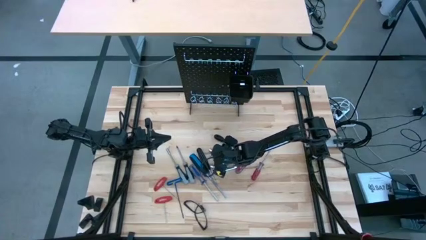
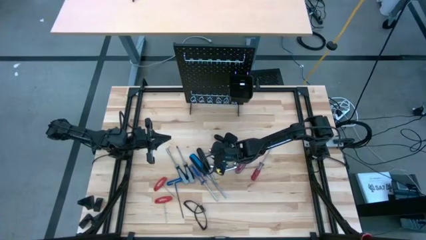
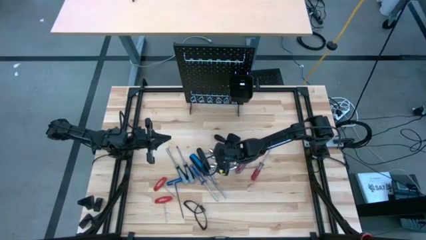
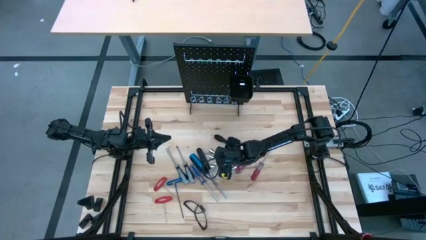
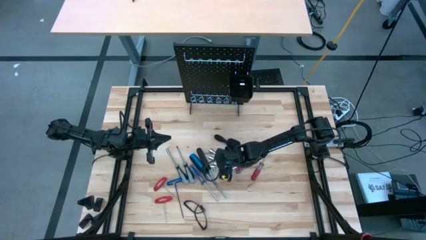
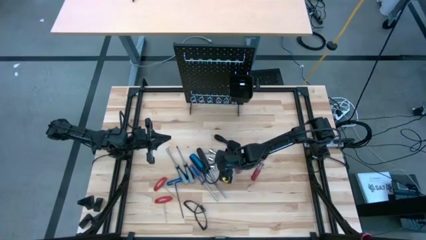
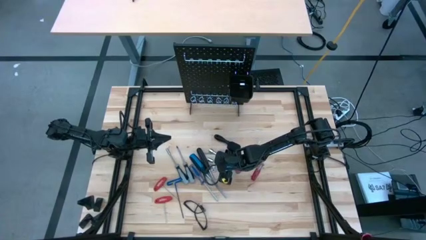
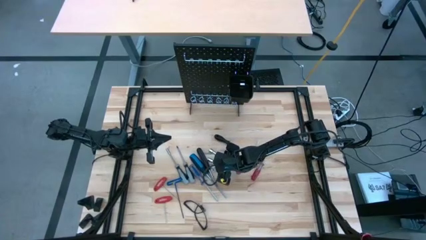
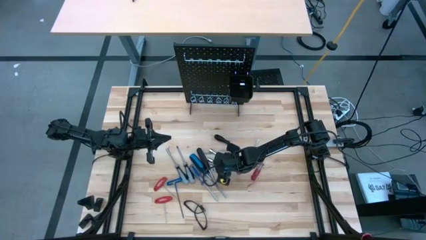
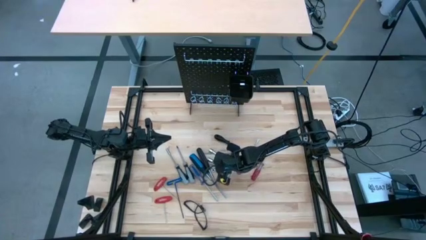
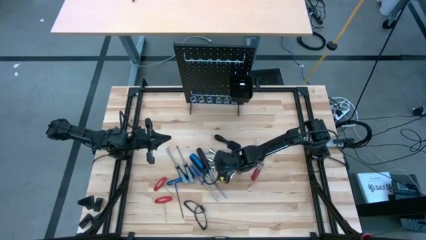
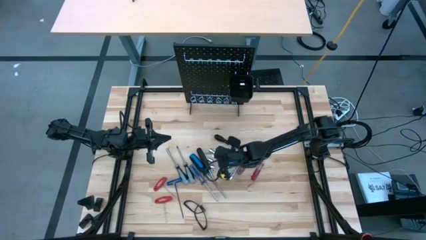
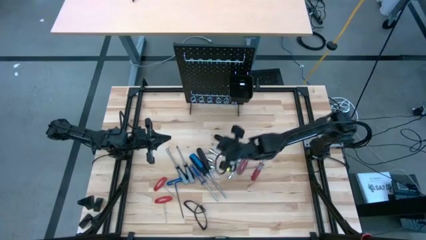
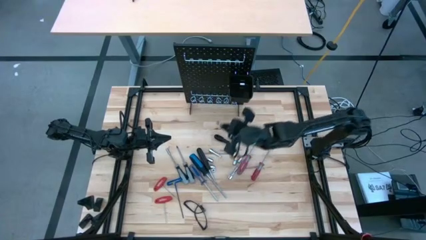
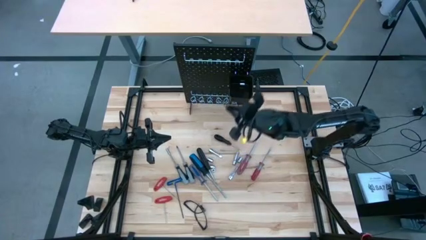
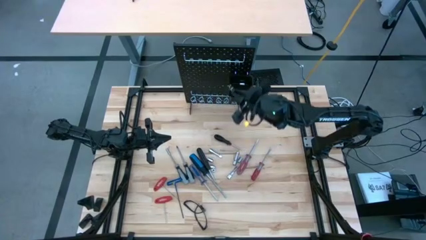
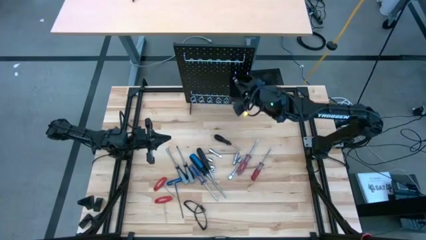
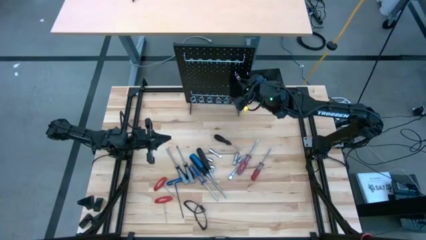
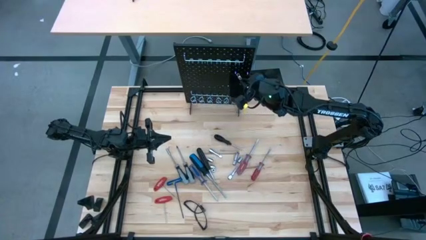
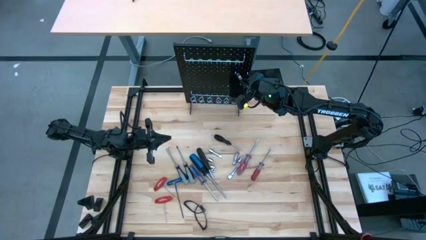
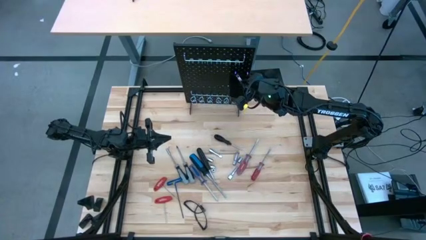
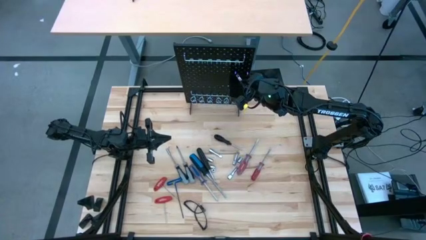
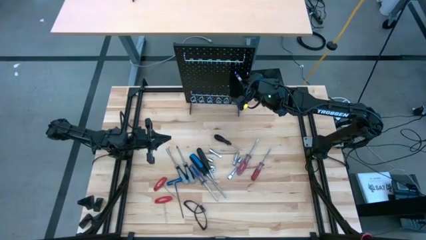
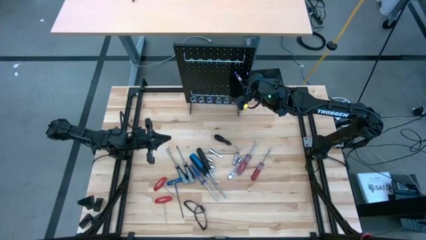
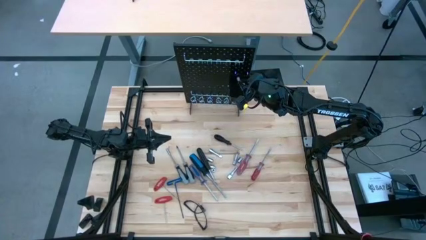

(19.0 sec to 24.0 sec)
Task: Hang tools onto peg board
Put the extension bar into the black bin on the pegboard

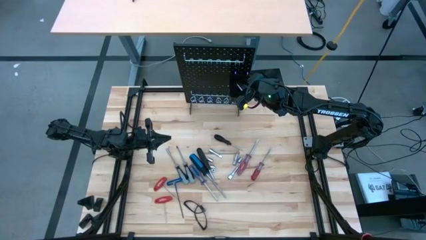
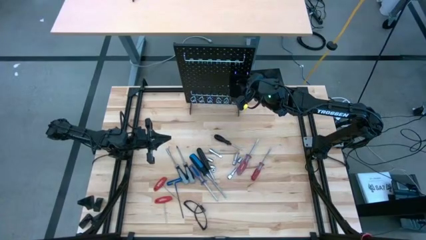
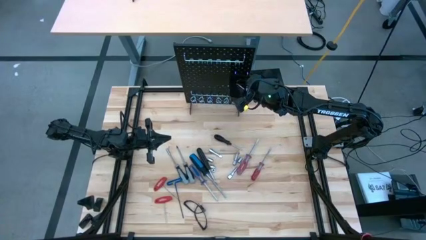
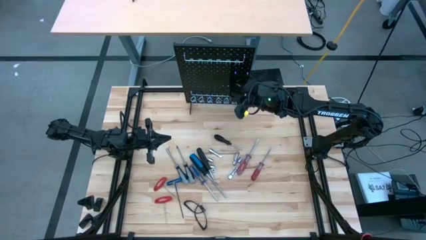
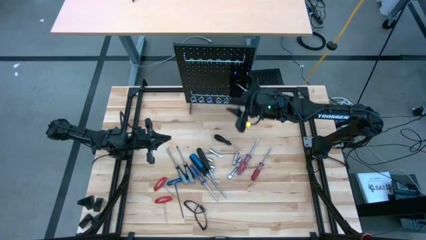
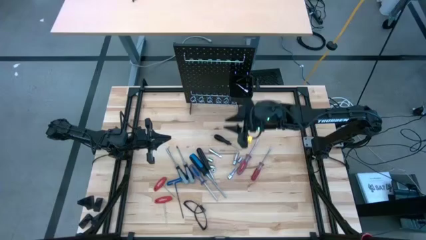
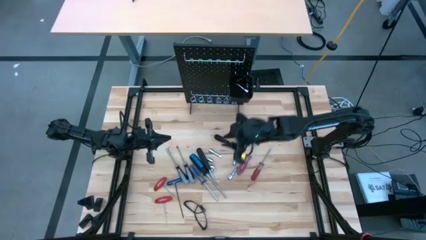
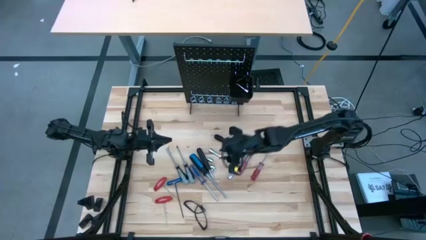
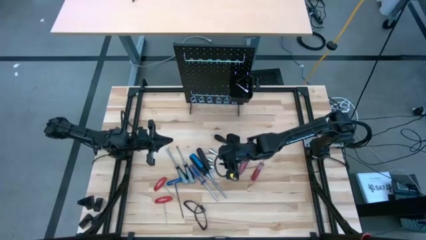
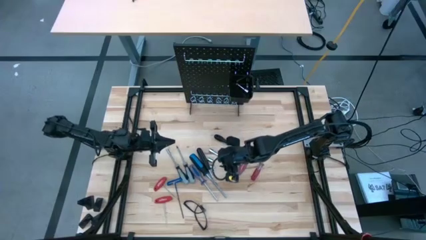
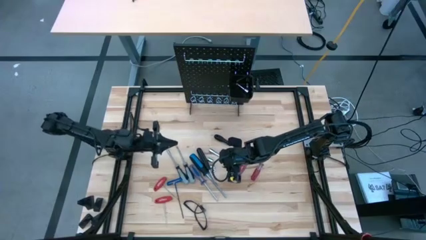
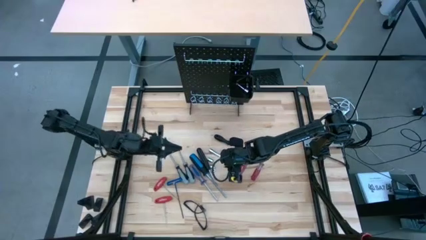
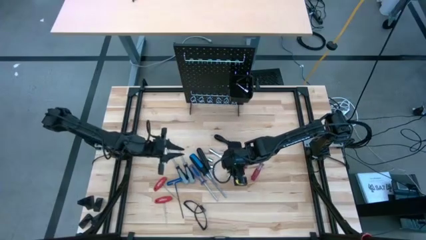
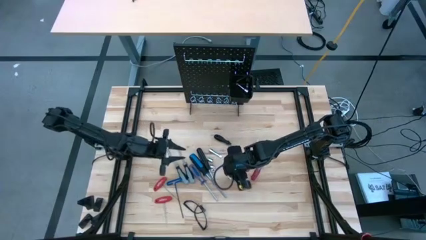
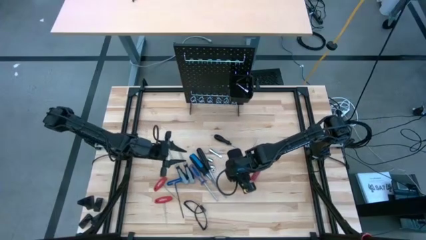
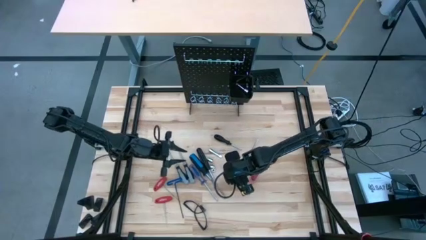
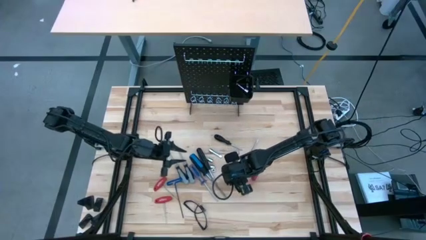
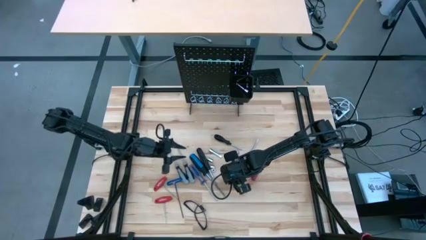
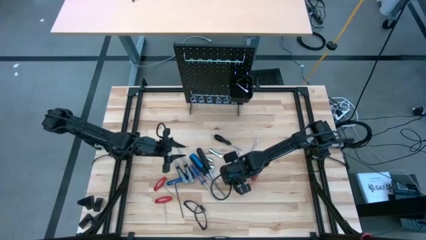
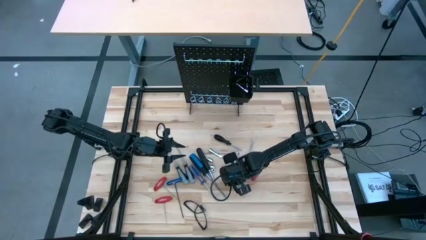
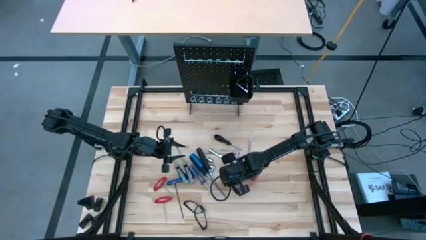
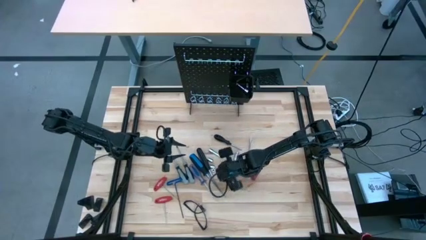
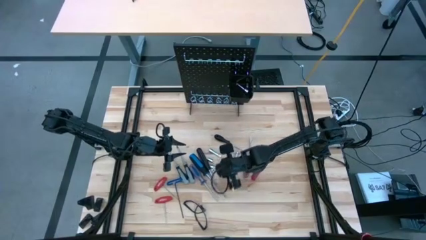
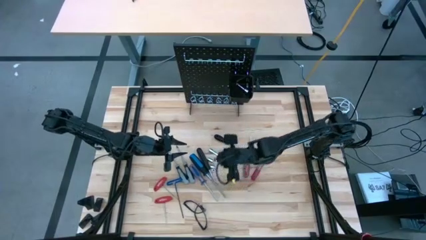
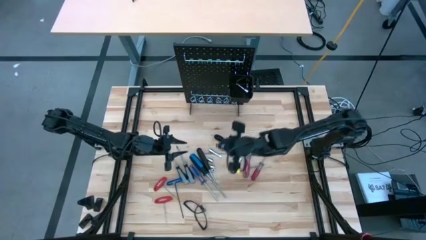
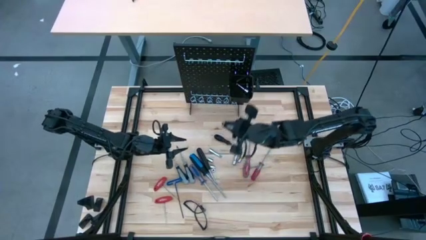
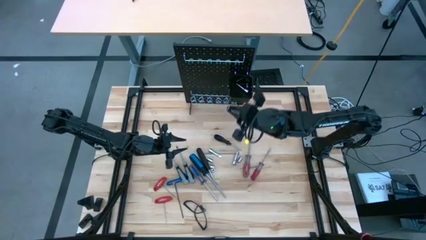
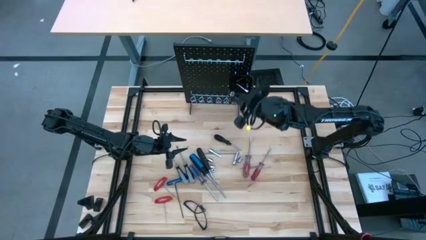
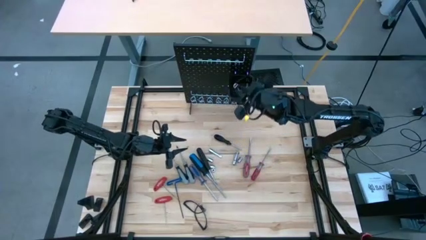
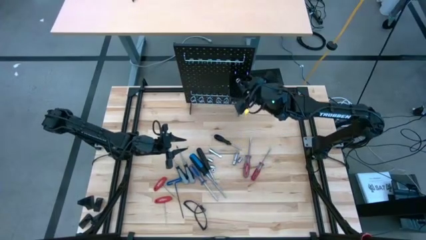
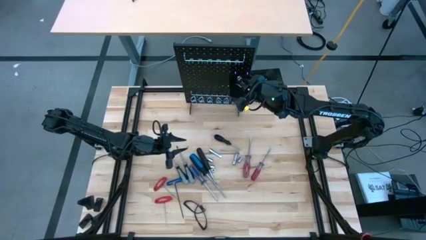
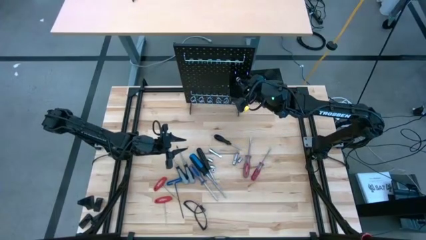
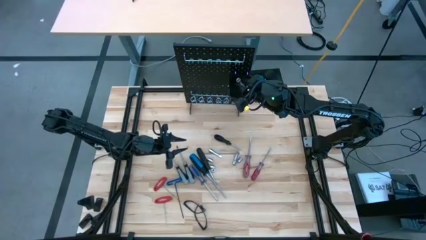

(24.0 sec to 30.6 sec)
Put the extension bar into the black bin on the pegboard

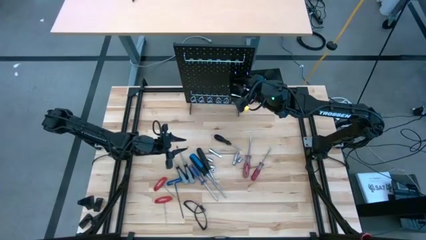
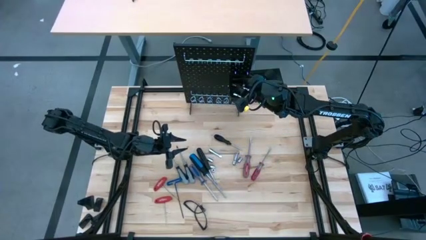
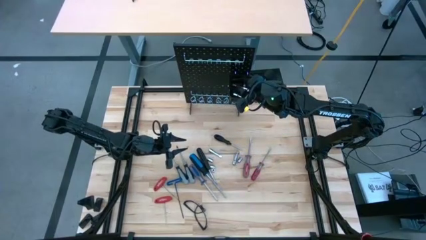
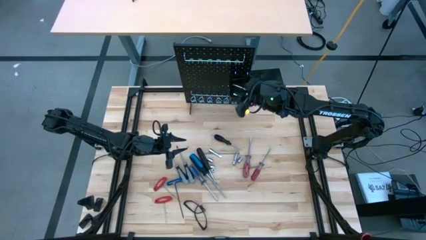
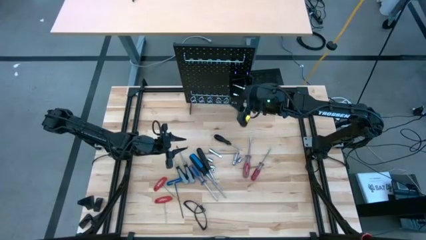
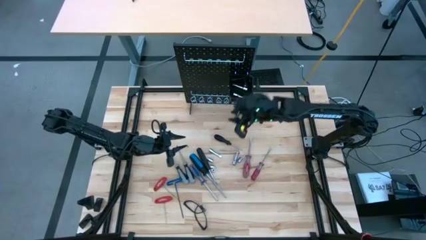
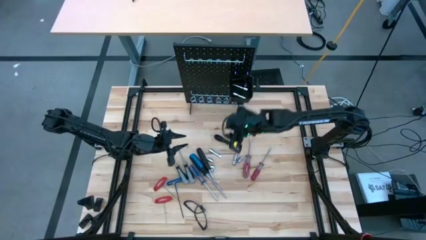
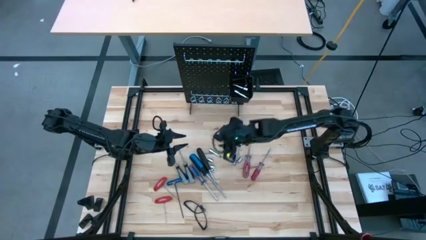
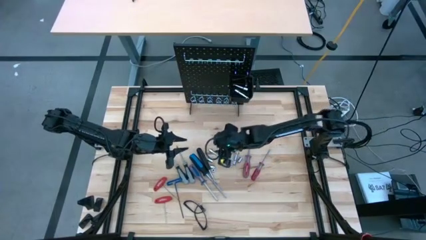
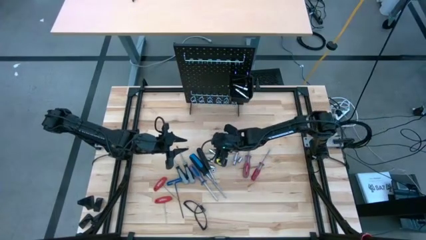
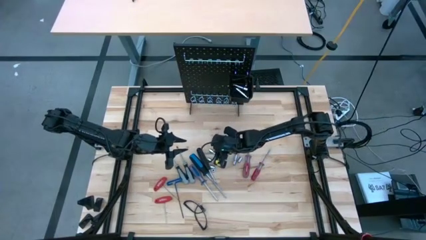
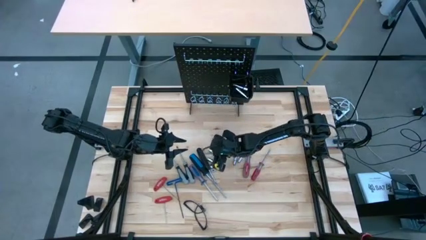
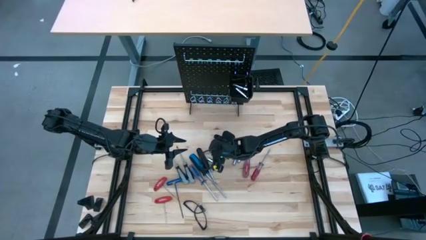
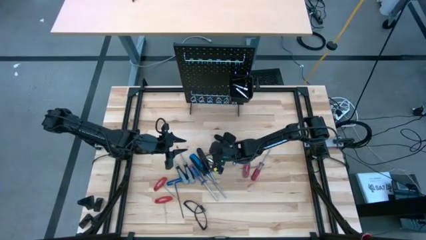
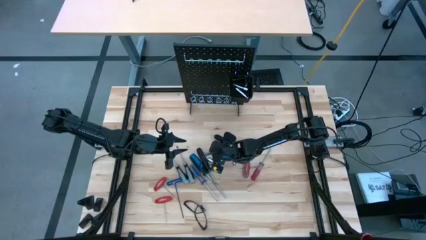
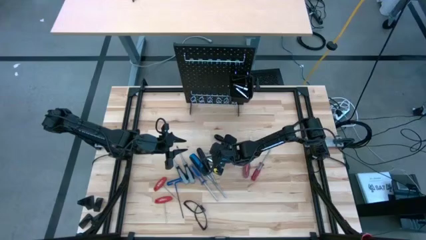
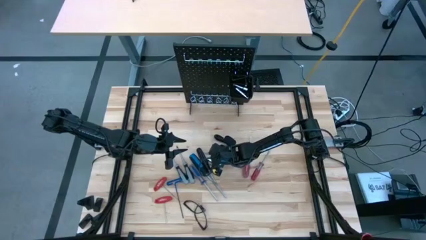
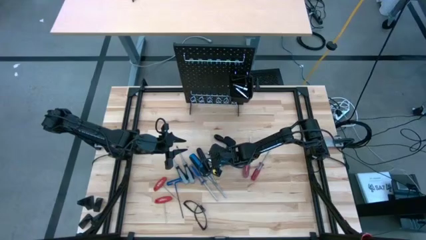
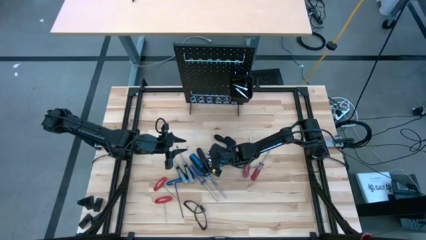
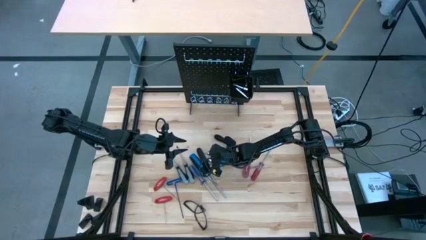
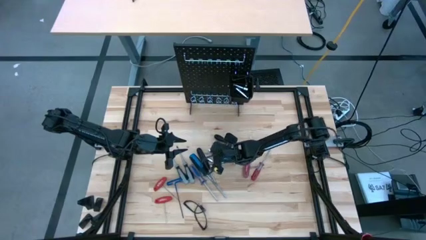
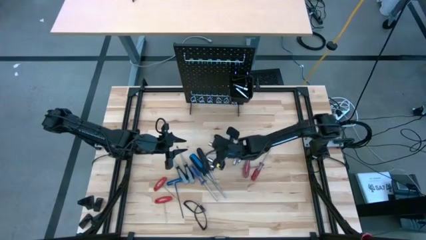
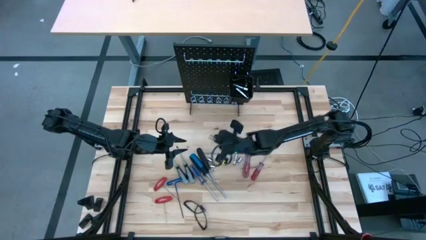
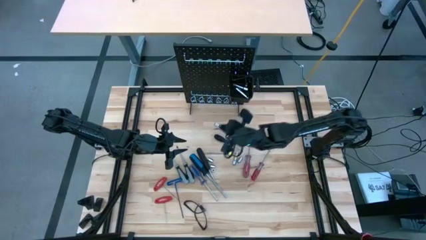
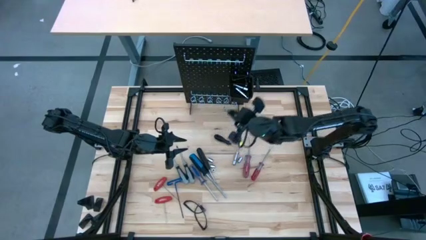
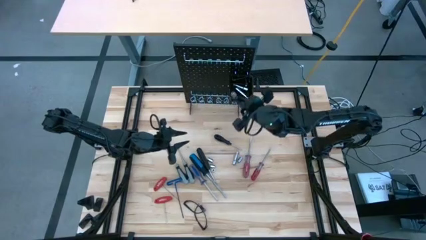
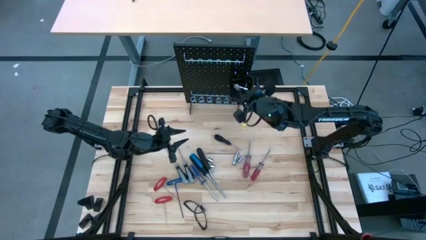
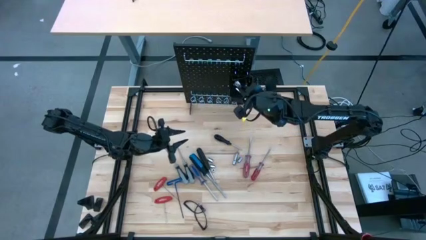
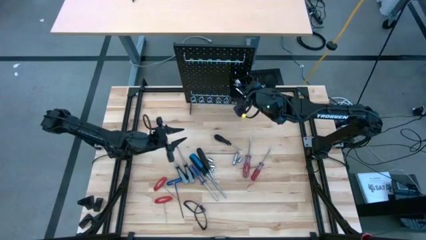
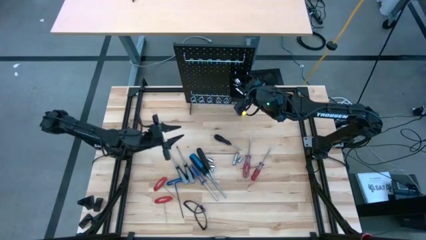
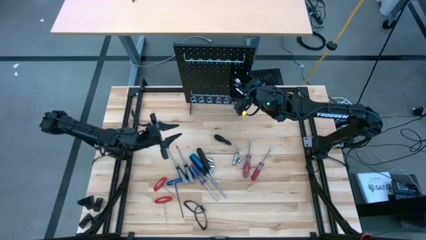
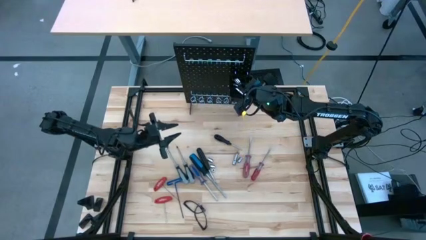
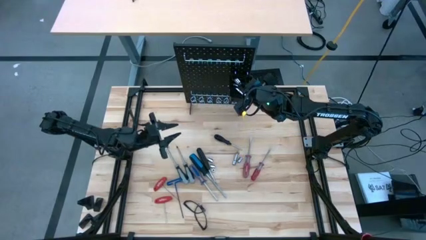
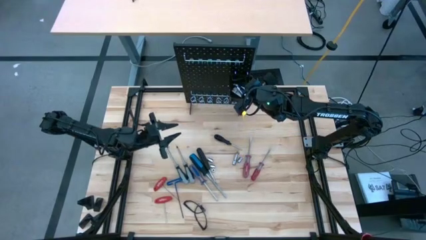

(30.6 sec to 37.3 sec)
Put the extension bar into the black bin on the pegboard
